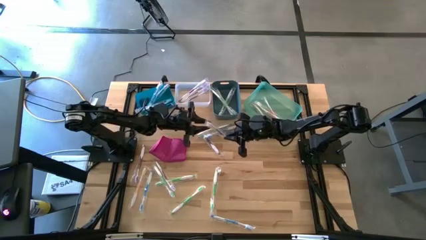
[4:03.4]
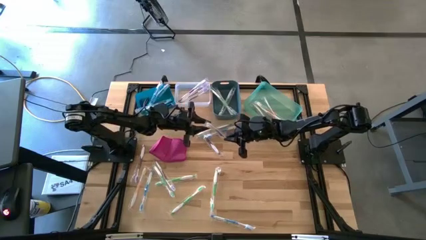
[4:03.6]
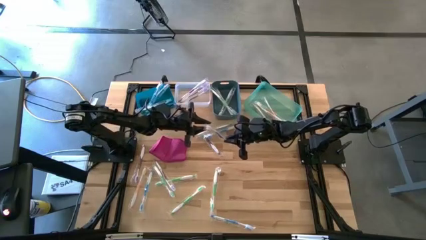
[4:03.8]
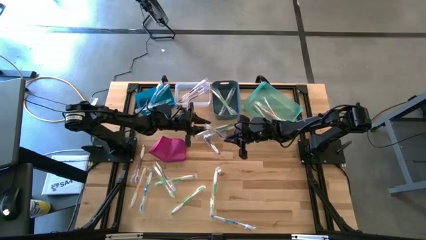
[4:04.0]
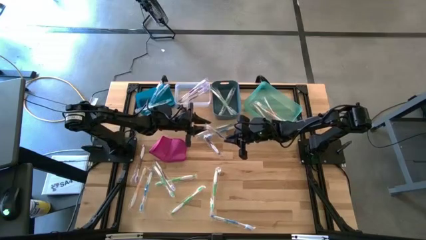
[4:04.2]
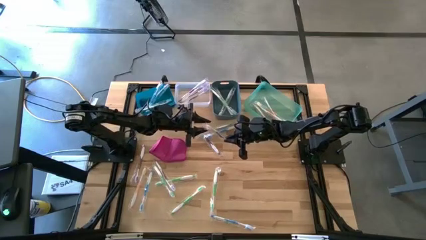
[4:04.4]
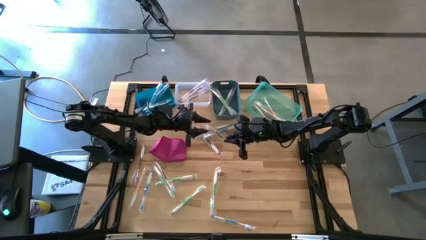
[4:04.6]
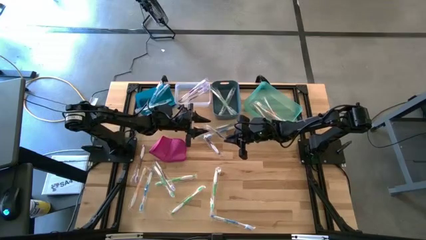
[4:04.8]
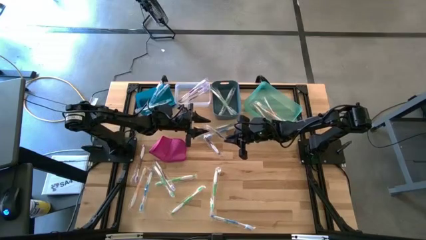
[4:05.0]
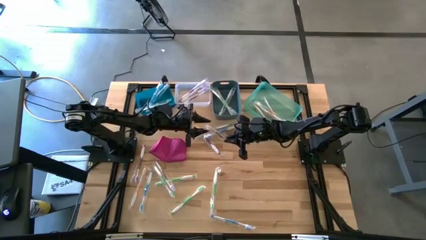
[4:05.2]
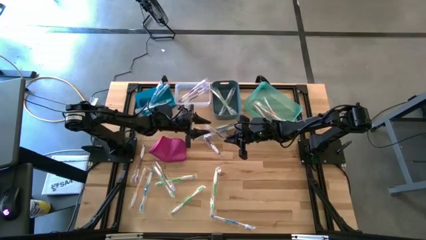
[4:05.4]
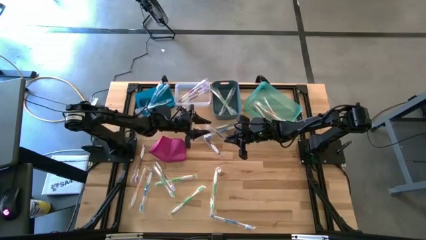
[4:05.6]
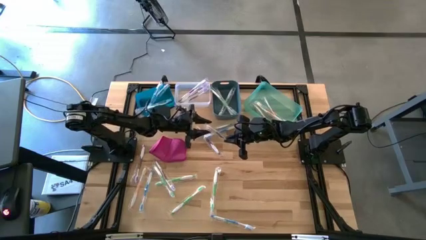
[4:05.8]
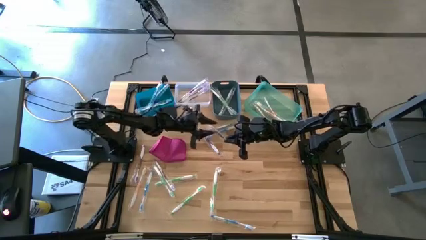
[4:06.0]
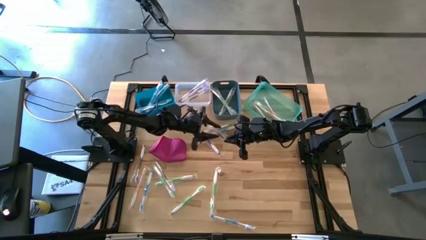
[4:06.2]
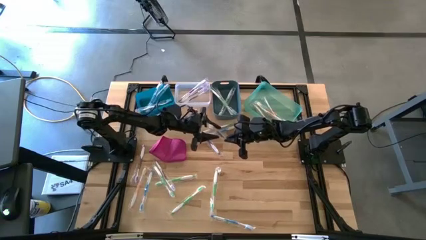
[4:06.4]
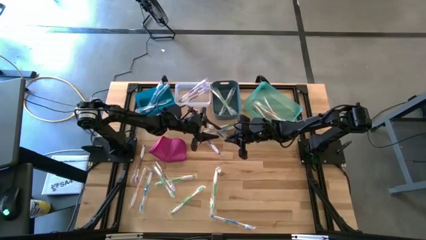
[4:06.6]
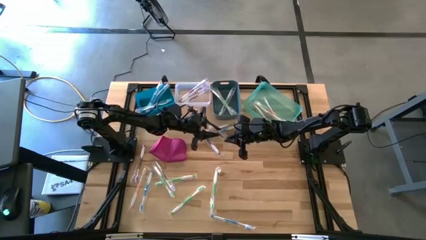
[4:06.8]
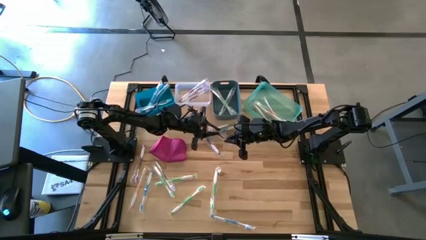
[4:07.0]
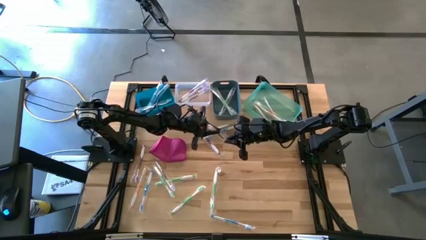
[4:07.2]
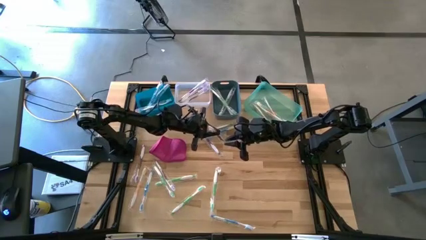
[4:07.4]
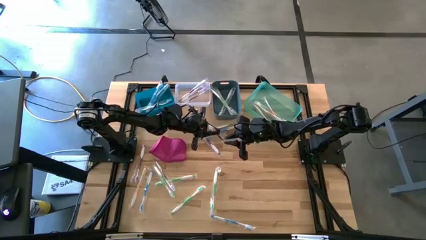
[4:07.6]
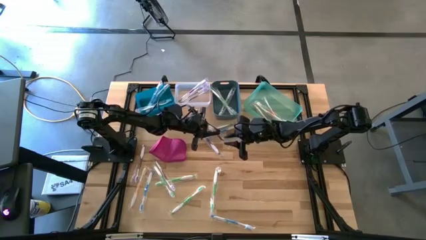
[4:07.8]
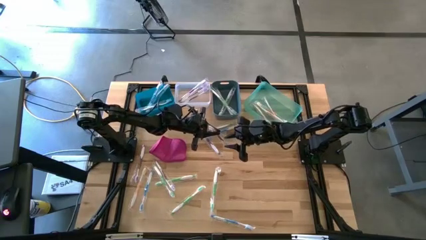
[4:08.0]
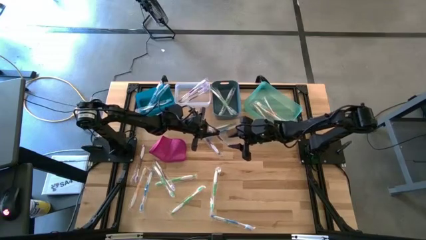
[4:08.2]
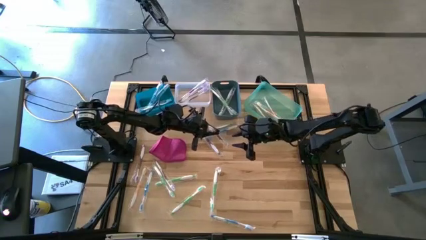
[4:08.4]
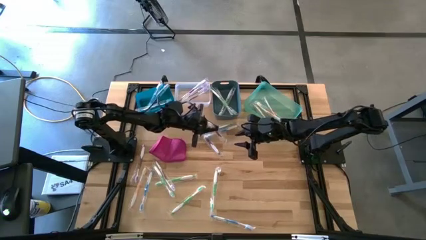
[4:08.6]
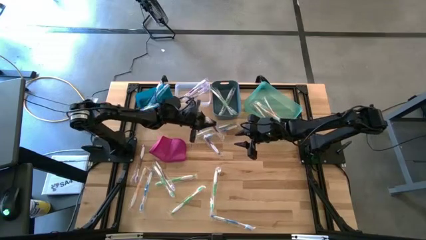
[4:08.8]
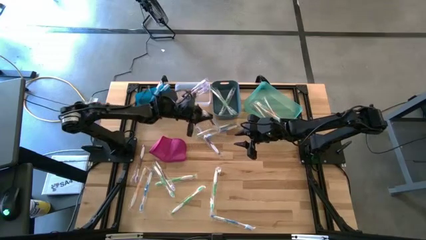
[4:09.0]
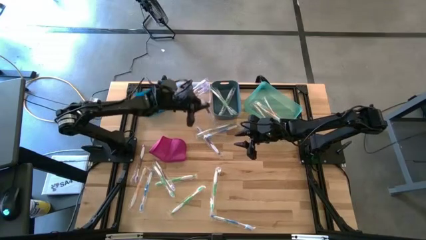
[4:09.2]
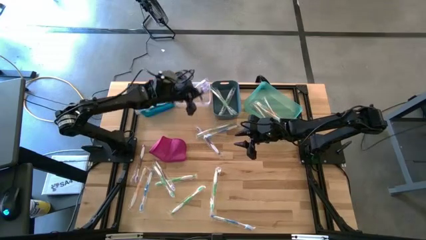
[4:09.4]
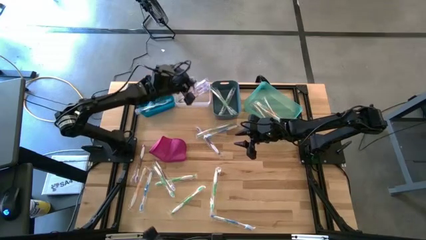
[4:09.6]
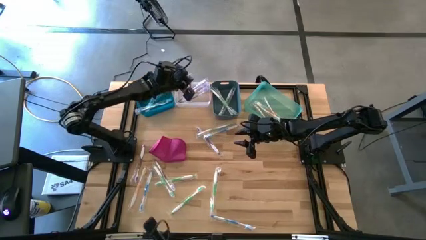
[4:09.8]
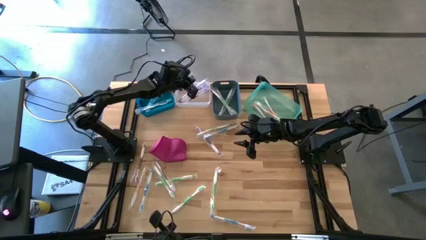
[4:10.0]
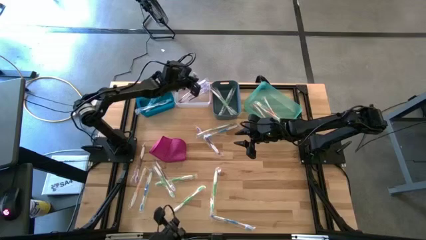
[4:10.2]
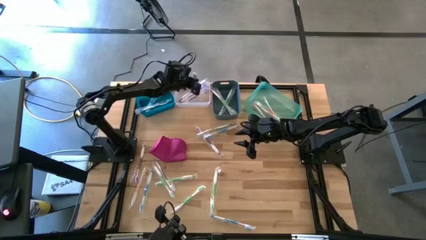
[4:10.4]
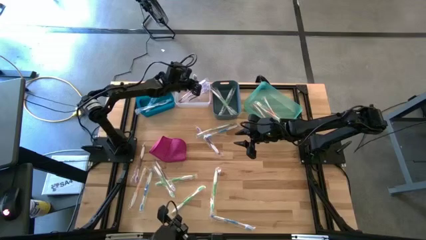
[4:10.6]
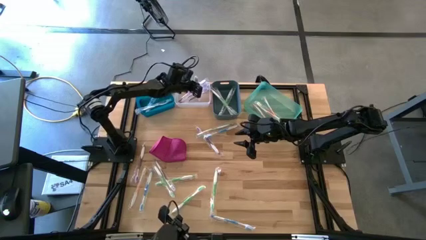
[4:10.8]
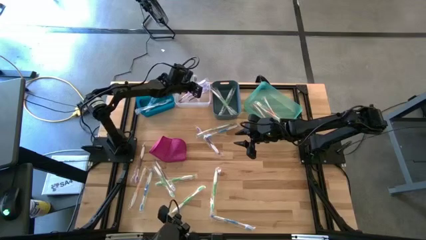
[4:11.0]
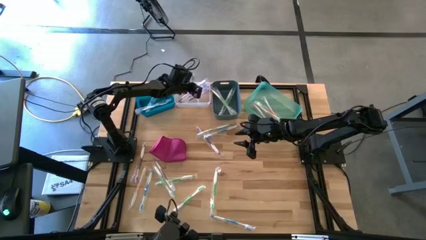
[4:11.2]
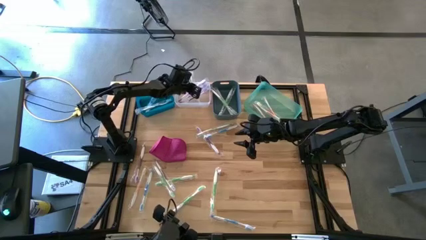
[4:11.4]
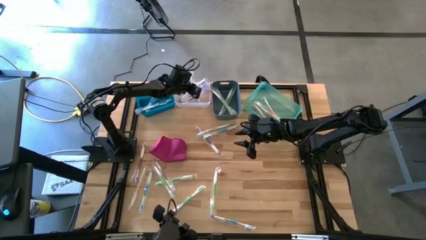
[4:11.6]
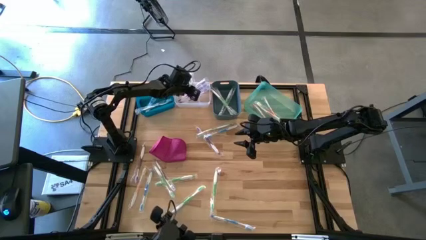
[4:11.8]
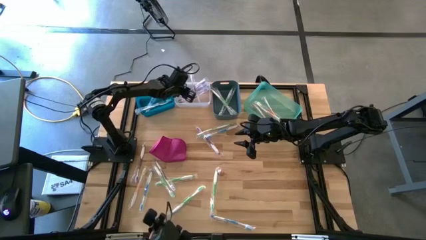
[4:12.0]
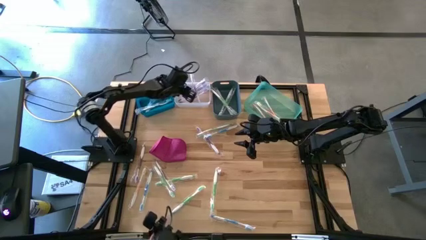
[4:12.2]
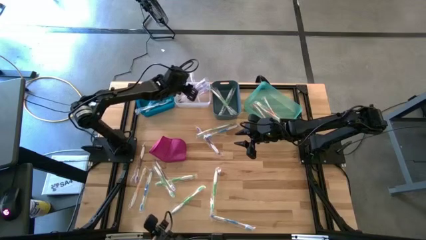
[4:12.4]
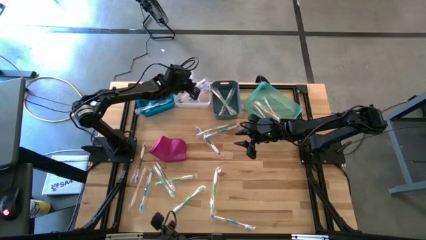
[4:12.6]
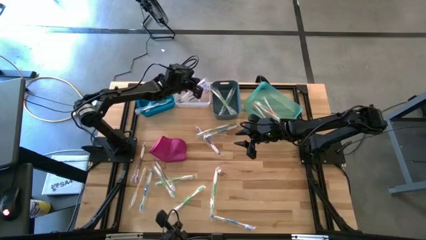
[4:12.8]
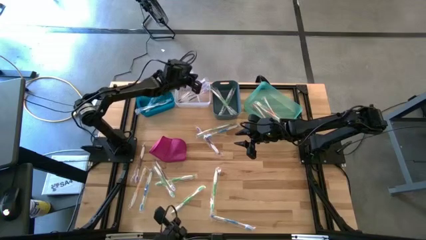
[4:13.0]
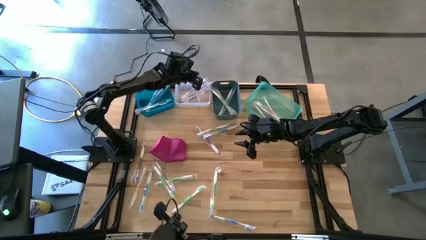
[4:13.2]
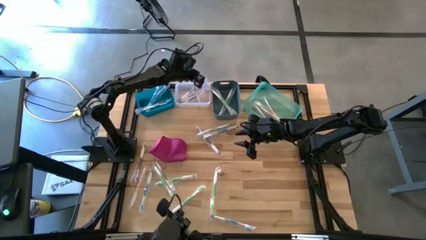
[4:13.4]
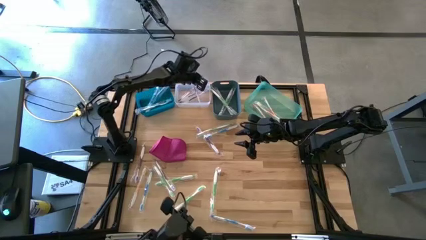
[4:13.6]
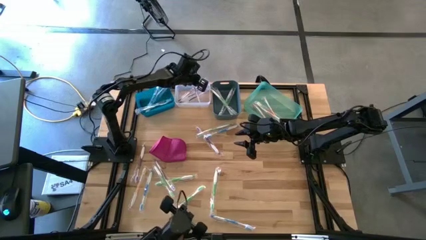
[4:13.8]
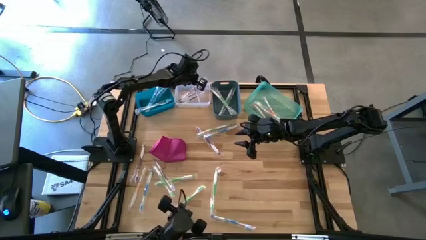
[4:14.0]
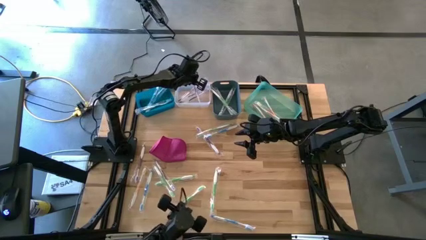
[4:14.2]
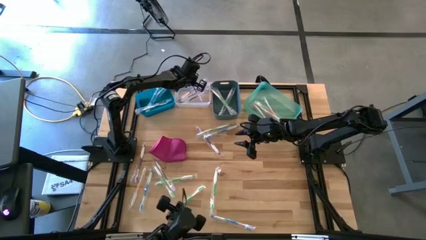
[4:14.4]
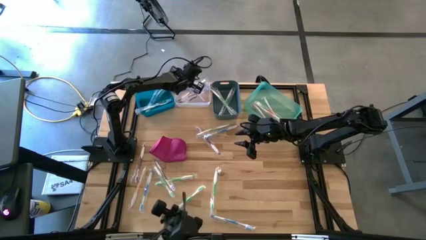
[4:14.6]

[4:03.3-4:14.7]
Task: Pick & Place Toothbrushes
Put the violet toothbrush into the white bin

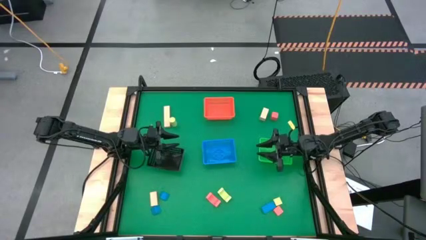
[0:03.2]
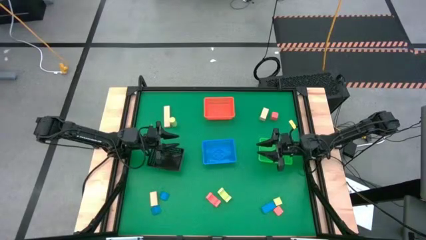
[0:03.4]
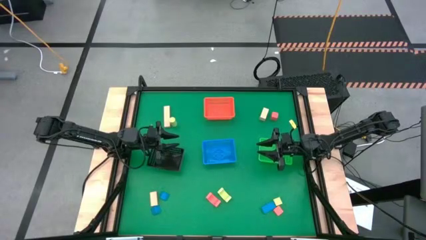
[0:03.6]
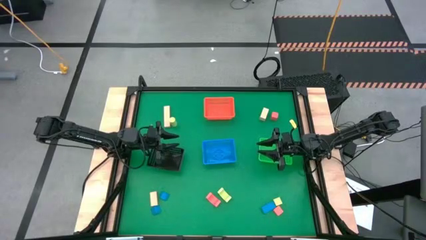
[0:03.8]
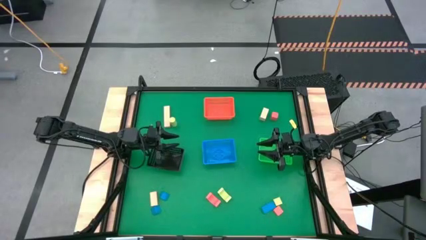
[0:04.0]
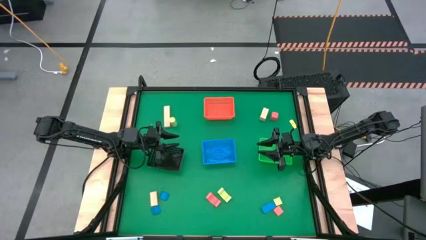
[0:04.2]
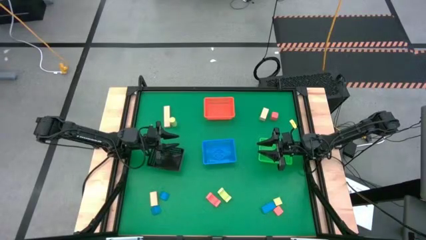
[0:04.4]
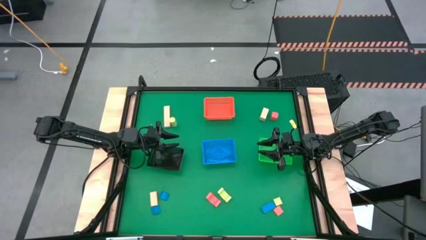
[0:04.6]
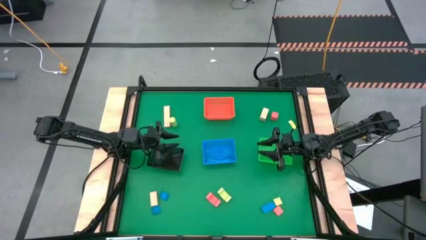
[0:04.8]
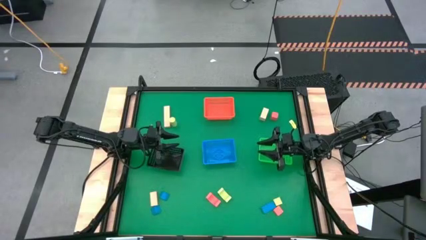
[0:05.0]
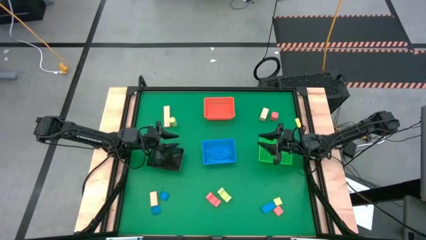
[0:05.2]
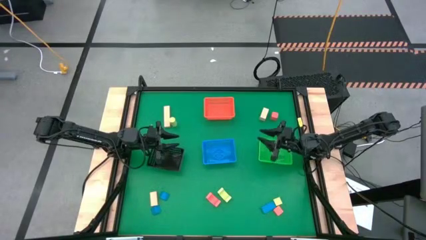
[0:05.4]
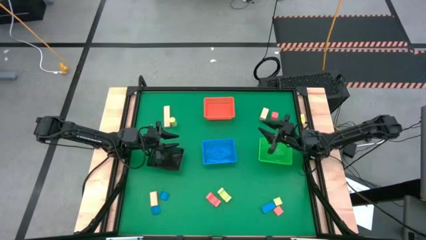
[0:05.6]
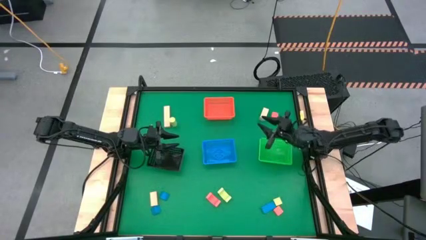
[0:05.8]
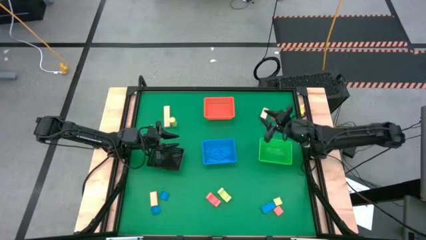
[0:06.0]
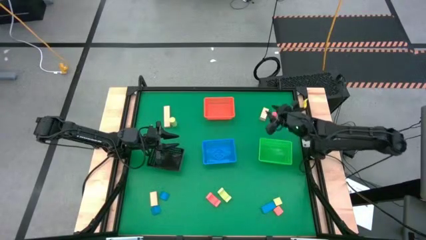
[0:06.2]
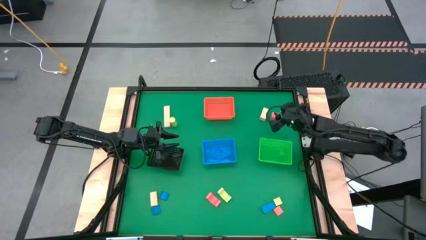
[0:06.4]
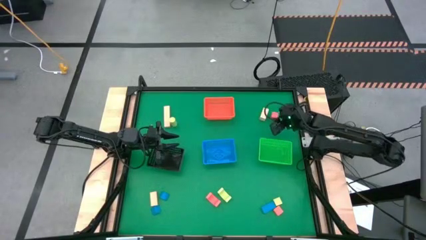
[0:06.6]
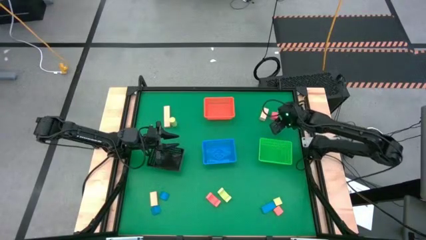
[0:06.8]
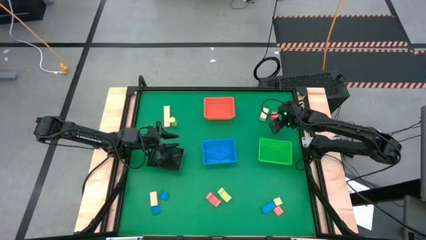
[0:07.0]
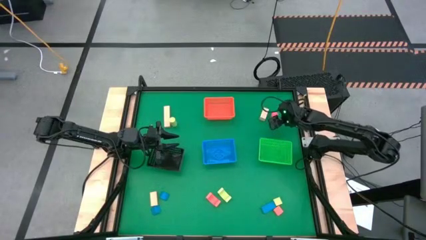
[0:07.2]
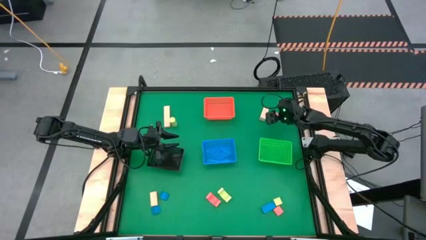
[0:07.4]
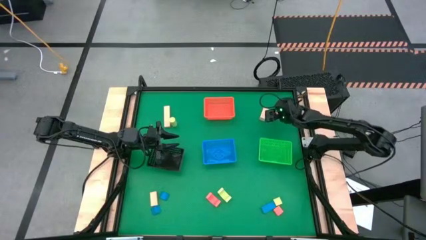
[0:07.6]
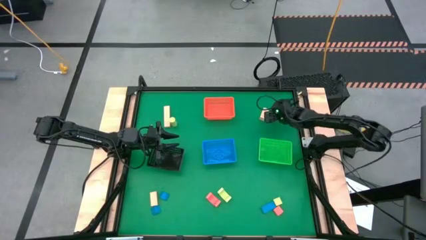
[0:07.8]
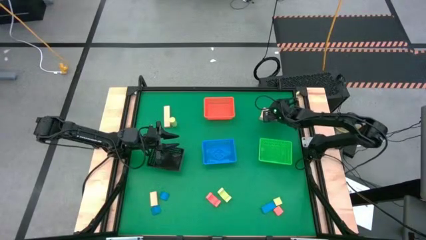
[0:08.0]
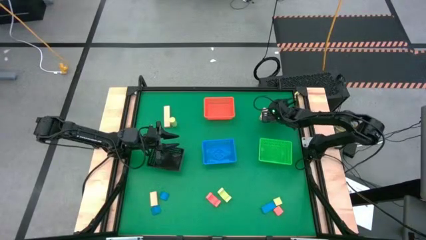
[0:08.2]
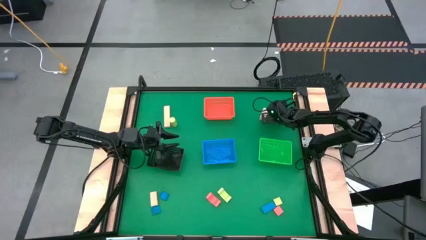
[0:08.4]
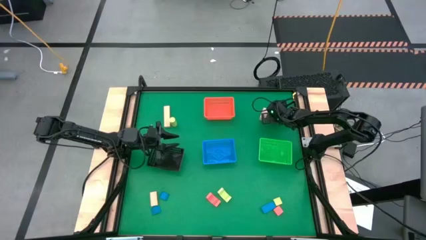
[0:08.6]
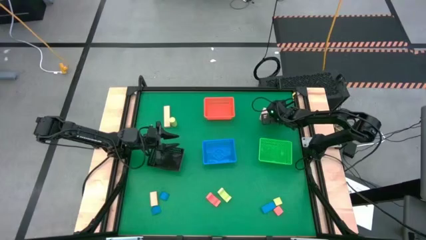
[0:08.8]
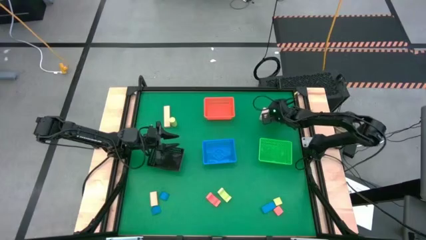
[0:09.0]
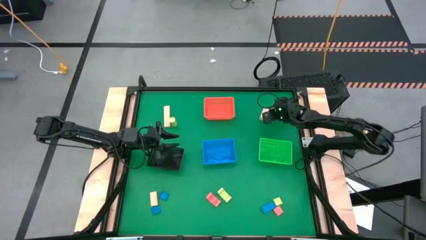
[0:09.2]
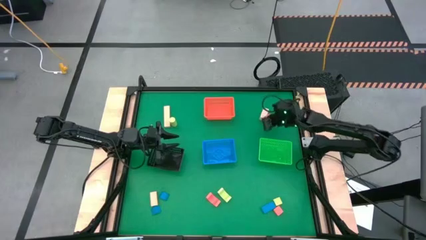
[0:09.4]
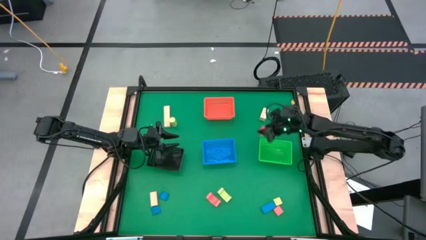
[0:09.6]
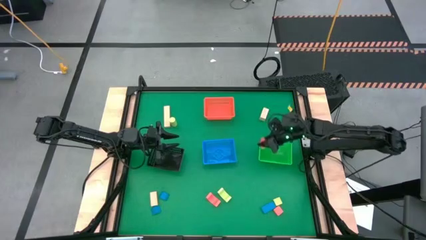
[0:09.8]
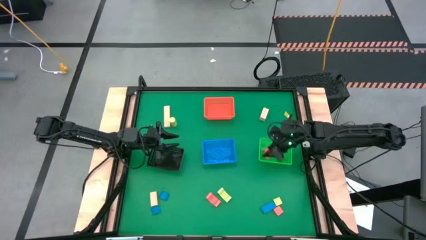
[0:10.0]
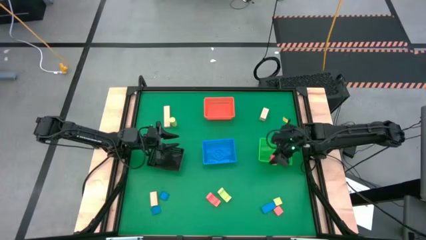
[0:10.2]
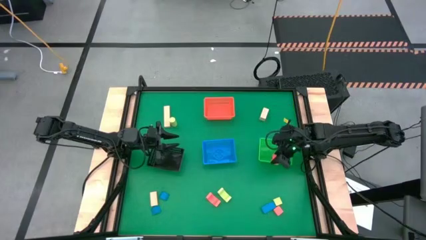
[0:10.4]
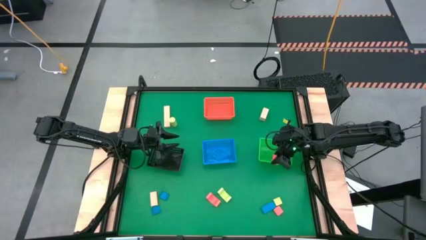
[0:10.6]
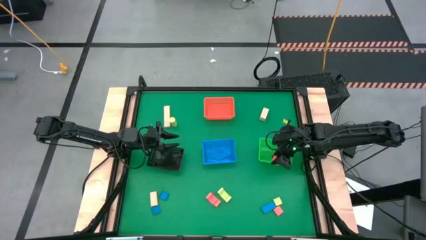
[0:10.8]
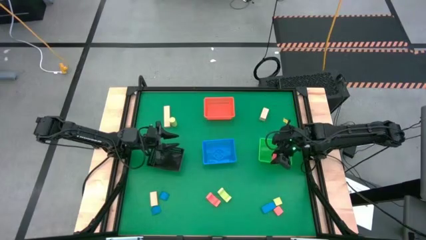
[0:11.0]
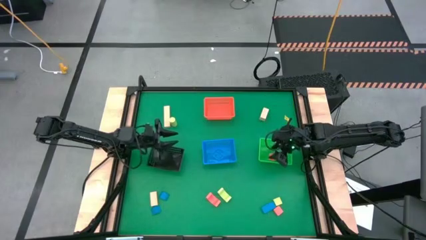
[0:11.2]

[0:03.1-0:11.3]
Task: Sort & place blocks by color
Put the top right red block into the green bin
